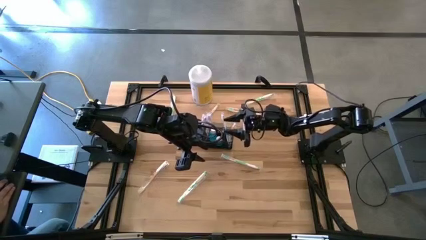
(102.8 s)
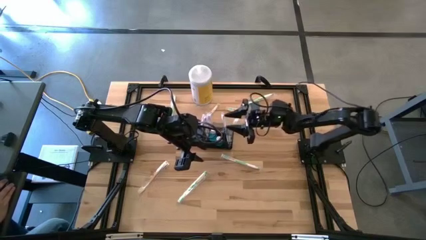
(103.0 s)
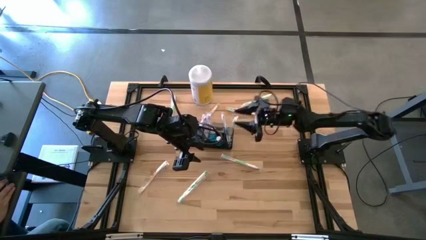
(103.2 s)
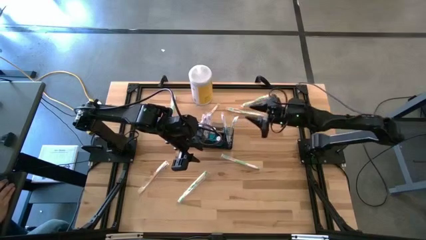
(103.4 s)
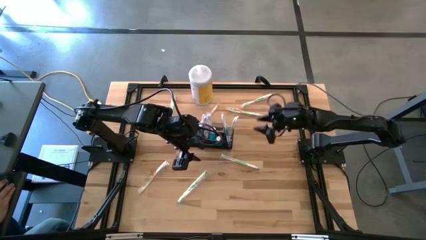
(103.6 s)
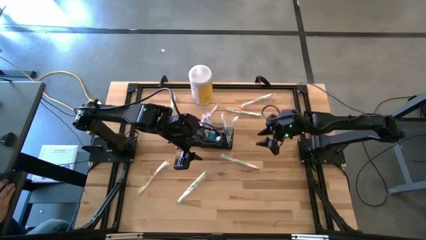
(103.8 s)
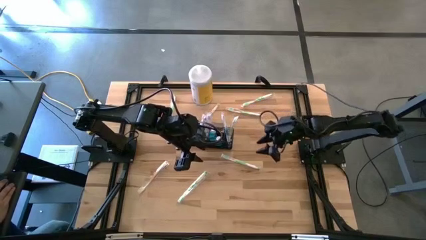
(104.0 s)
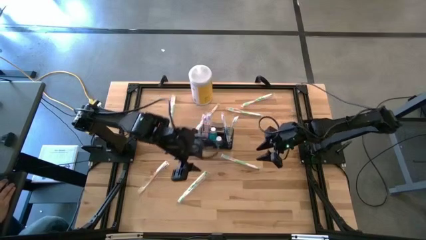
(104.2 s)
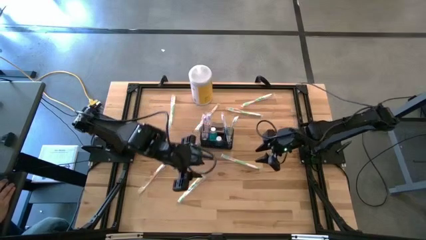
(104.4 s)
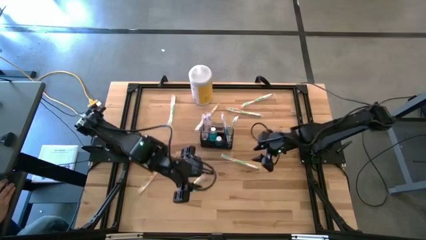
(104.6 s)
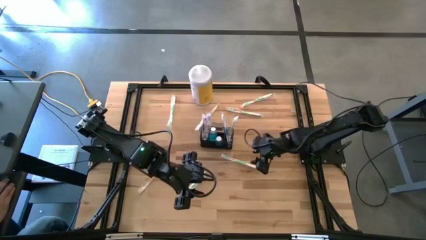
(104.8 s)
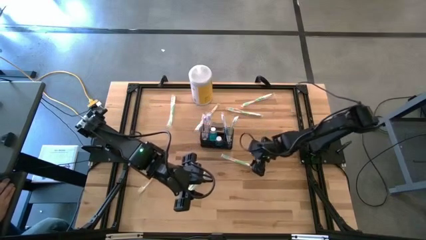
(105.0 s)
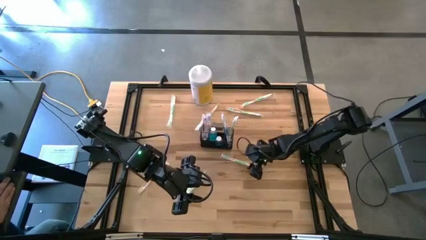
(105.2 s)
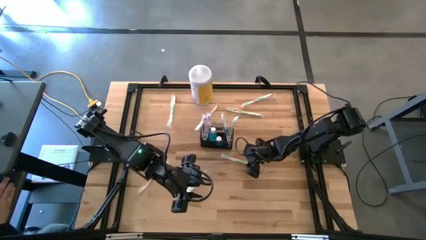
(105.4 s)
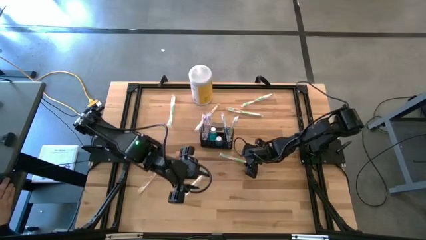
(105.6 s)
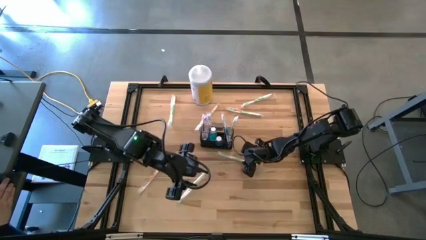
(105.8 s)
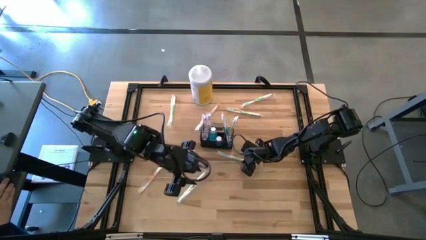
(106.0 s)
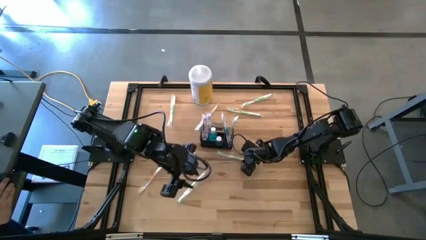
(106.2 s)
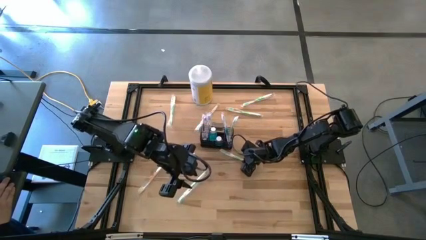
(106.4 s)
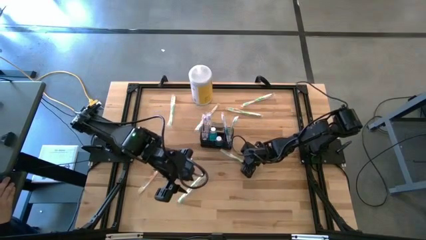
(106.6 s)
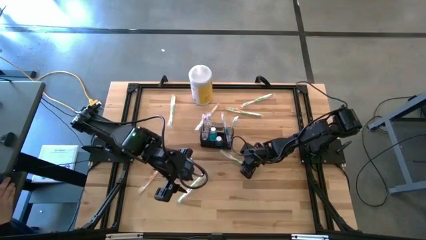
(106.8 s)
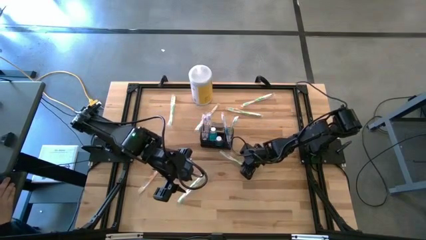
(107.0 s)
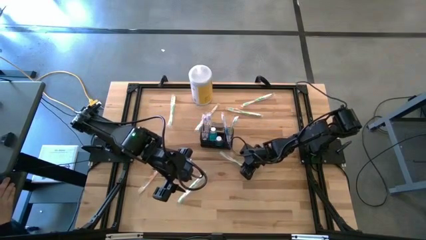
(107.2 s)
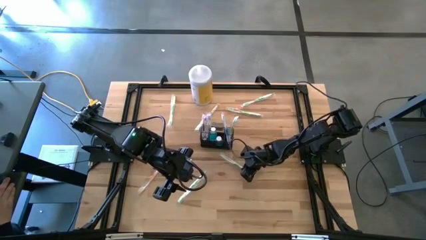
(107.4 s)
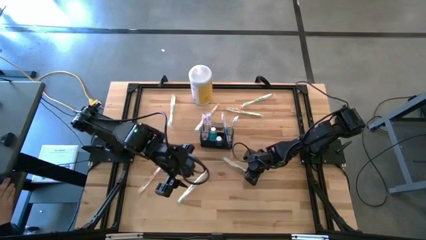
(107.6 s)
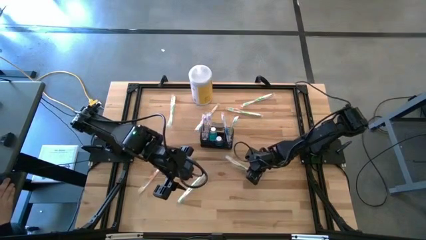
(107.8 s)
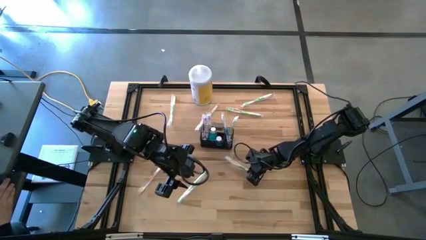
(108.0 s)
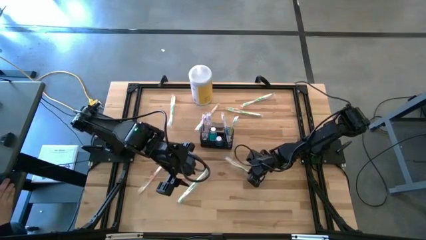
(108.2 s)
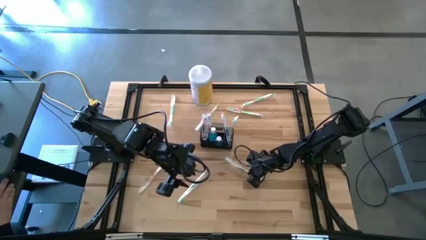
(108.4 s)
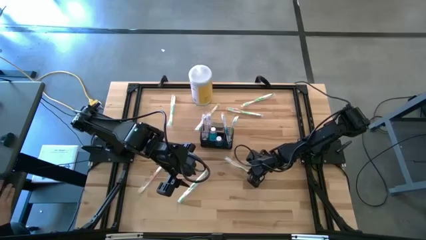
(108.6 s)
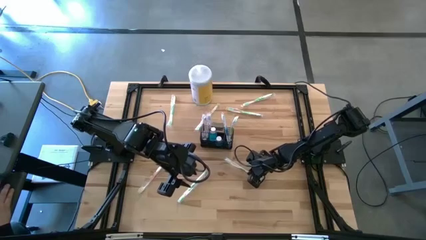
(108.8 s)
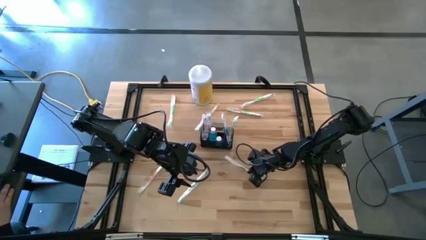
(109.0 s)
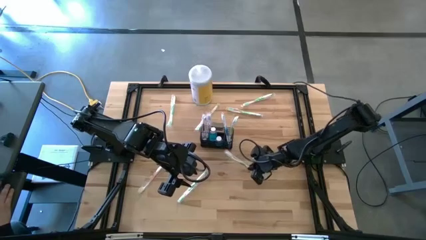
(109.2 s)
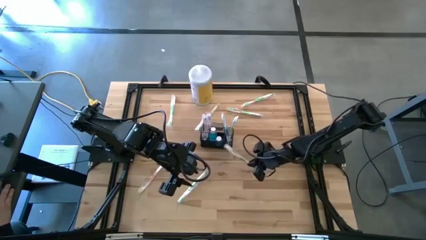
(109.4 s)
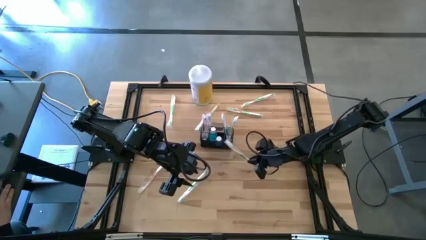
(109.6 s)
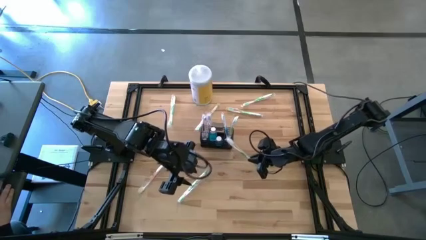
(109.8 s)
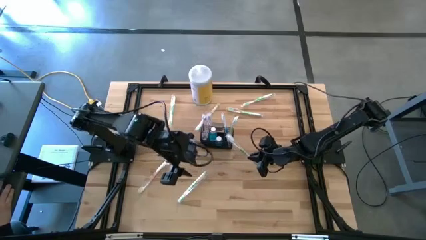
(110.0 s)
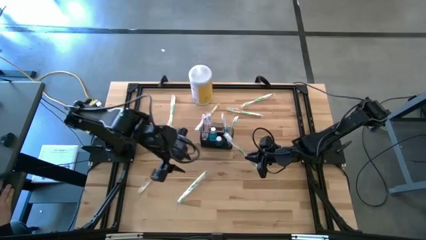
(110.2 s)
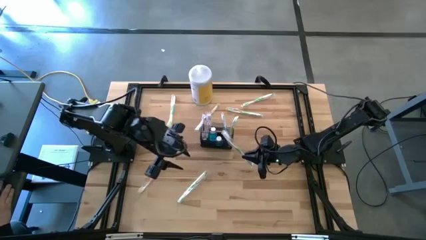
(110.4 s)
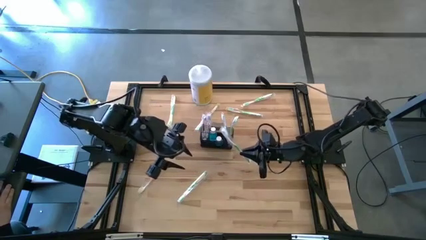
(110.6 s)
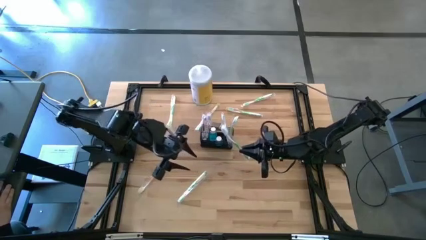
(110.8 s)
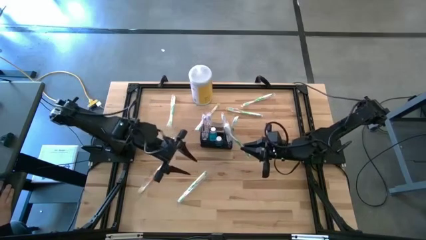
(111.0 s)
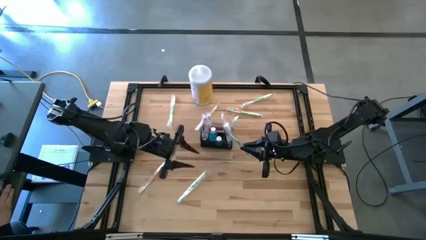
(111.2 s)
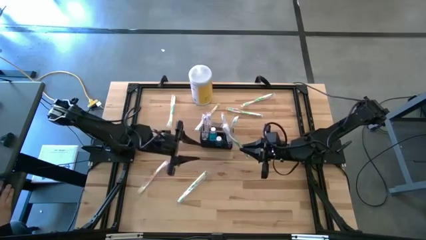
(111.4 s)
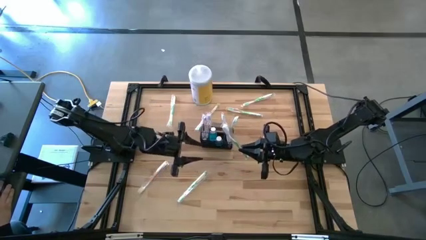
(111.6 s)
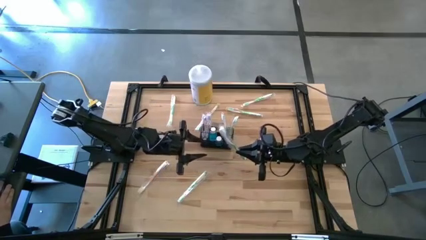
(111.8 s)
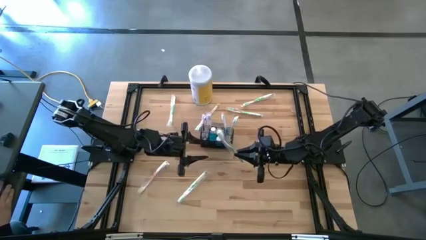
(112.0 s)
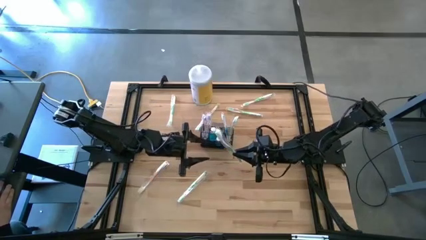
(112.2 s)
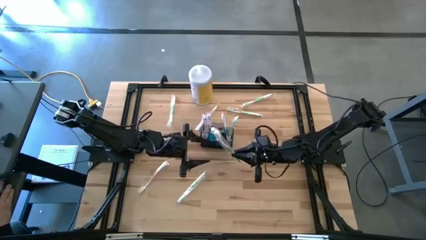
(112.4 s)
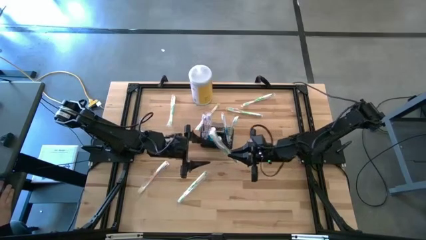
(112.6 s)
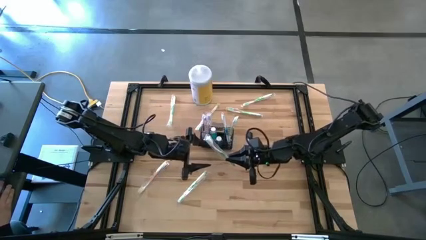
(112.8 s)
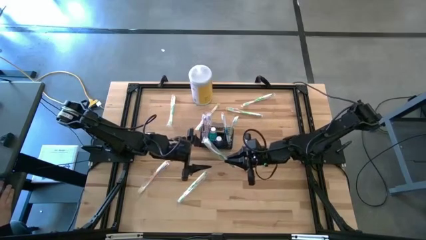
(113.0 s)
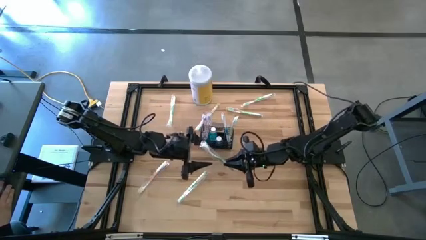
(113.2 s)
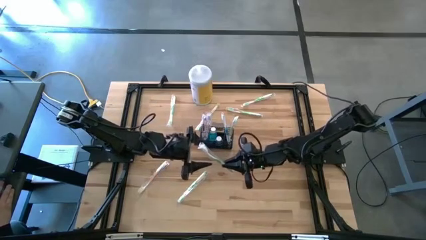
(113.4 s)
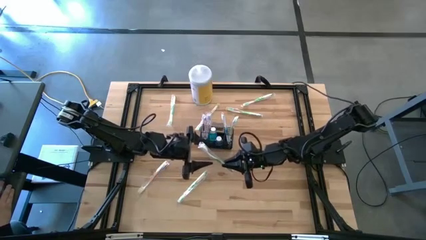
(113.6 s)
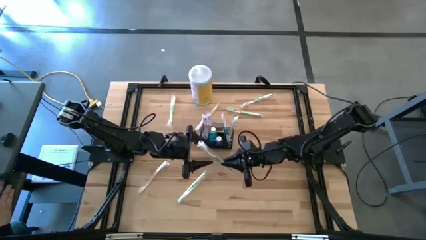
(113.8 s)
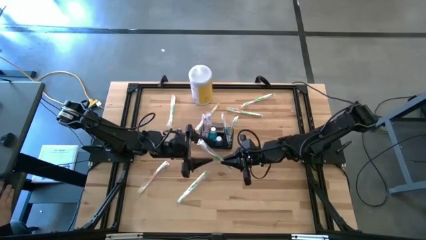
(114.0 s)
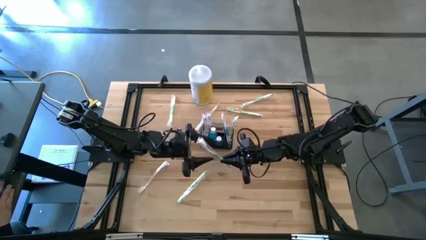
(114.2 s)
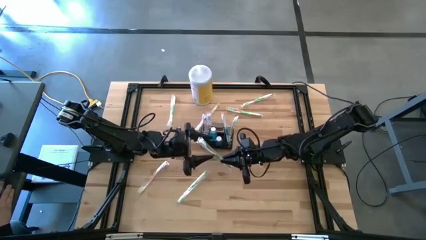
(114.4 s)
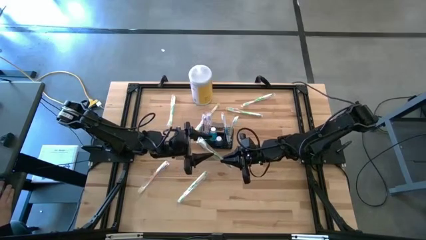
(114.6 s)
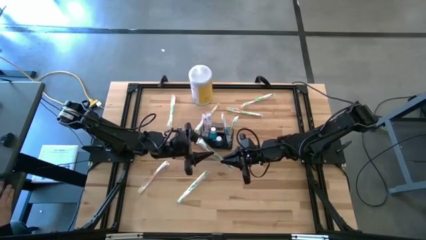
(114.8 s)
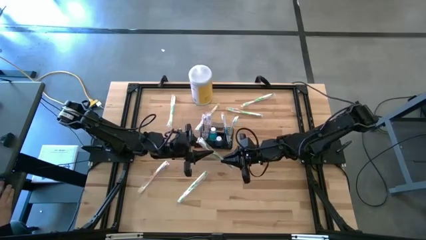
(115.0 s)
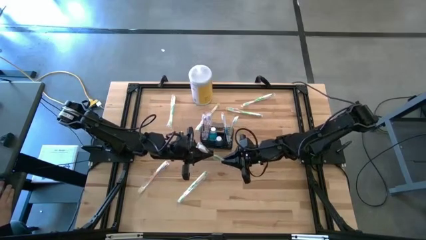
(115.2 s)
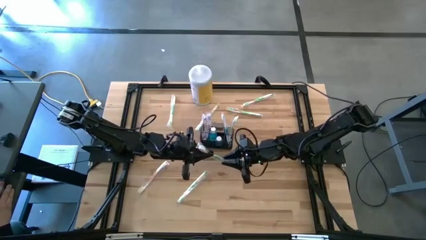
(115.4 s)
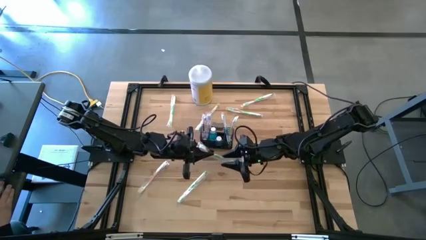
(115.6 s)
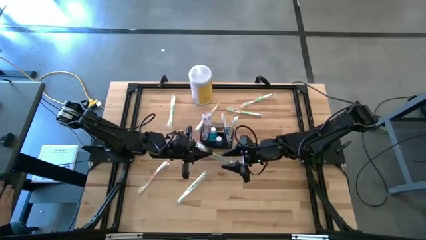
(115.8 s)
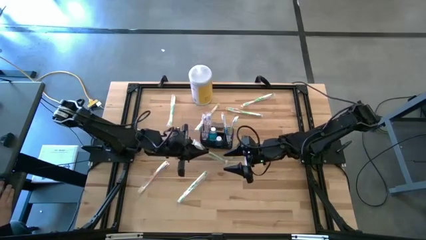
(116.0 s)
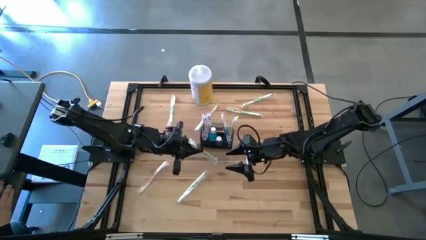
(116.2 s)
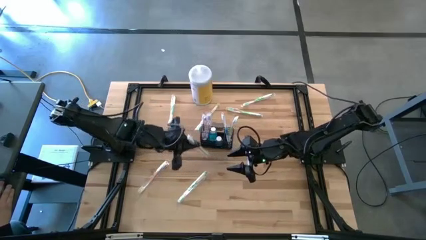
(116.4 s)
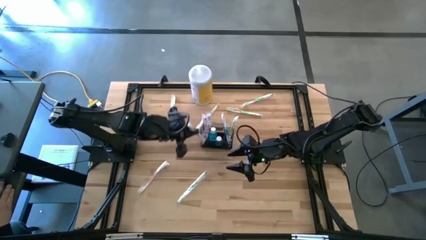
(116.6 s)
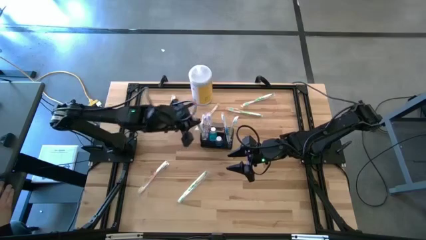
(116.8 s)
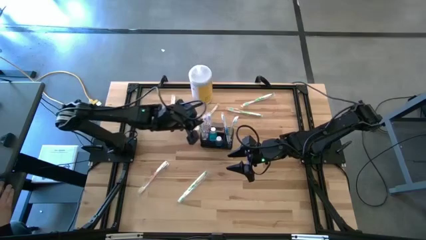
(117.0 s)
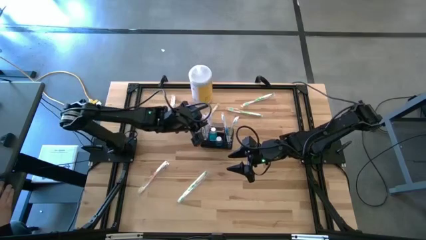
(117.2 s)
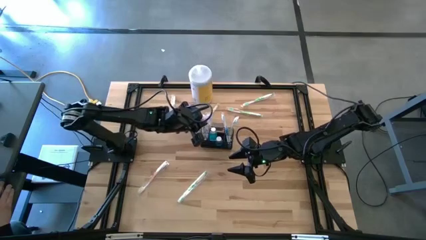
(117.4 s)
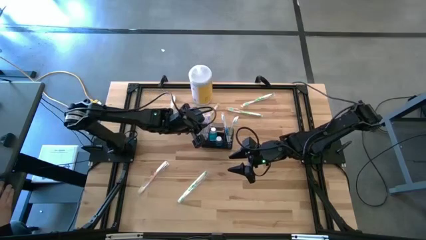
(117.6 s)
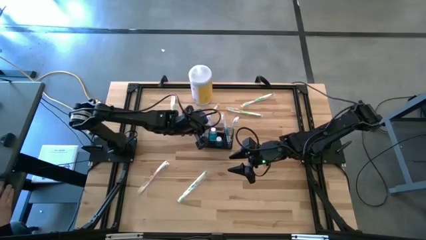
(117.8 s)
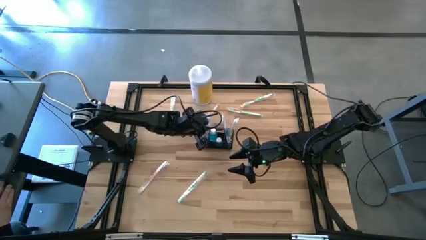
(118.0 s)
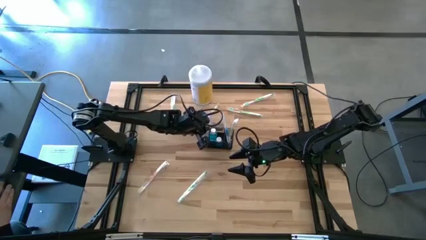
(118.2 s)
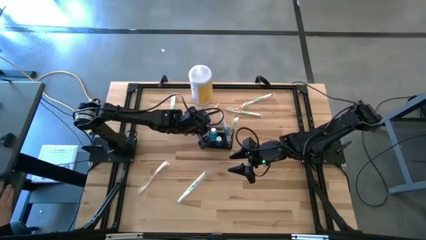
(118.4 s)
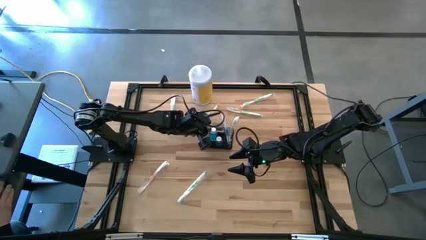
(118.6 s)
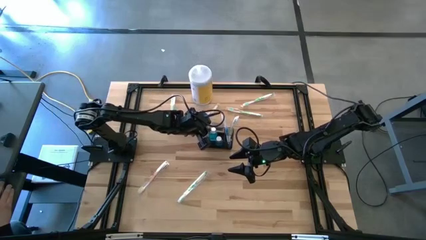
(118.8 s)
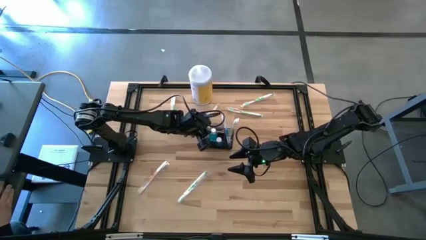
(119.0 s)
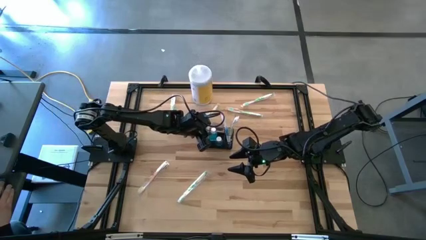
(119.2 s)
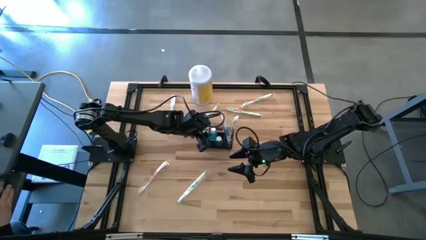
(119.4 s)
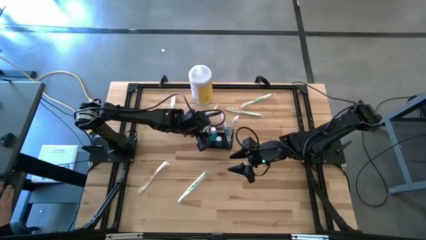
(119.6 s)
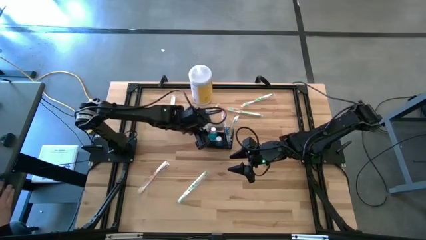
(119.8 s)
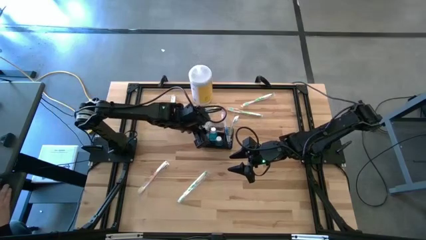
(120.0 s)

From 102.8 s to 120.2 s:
Task: Pick & Place toothbrushing station
Put the green toothbrush into the left section wire organizer

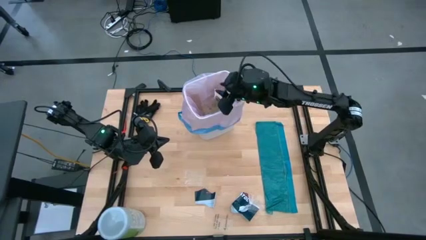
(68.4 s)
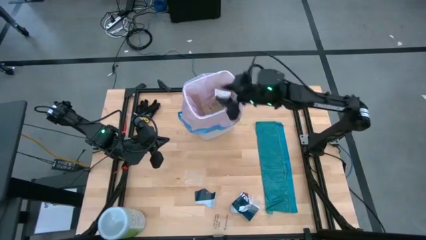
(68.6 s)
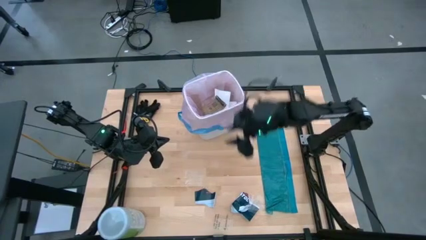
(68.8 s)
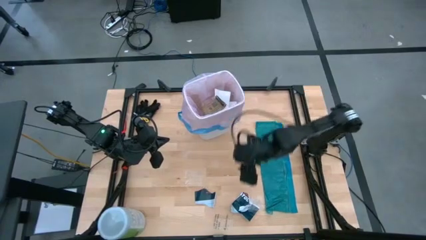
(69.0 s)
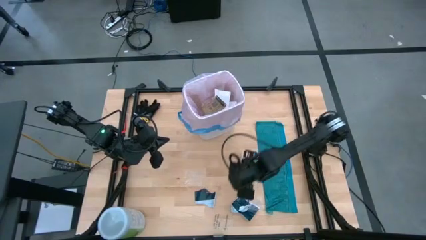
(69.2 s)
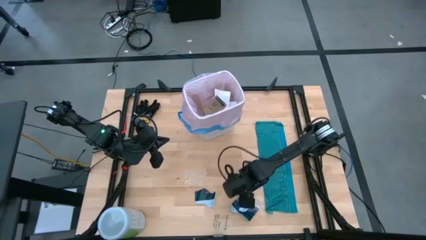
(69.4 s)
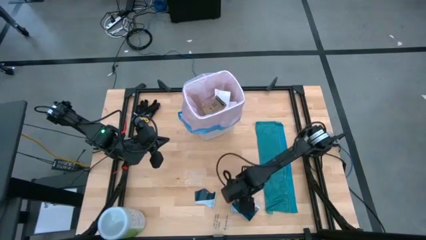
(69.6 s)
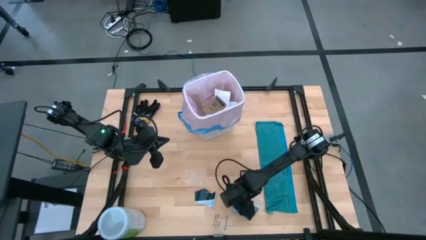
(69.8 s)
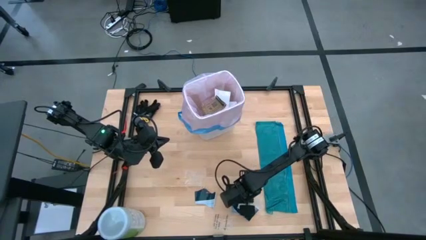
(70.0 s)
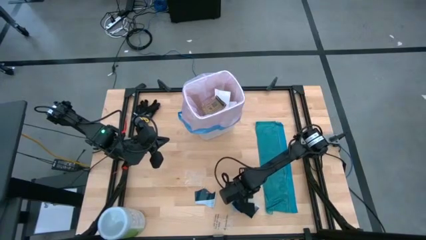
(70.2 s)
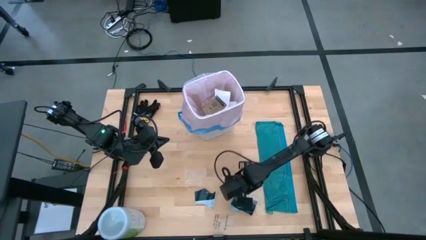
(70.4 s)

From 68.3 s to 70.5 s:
Task: place trash/remove bag and relplace
Put the black paper into the white trash bin
